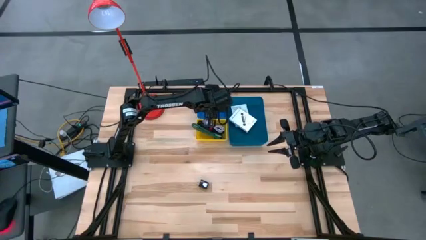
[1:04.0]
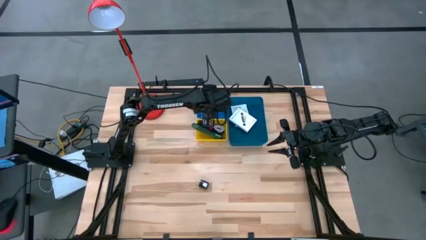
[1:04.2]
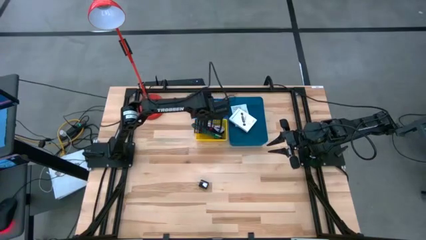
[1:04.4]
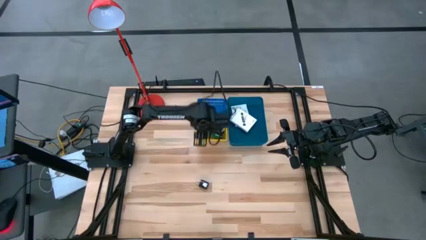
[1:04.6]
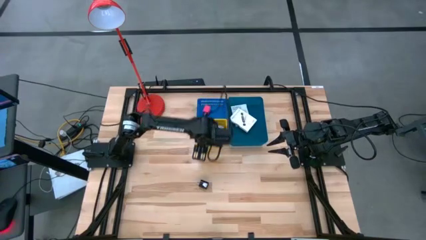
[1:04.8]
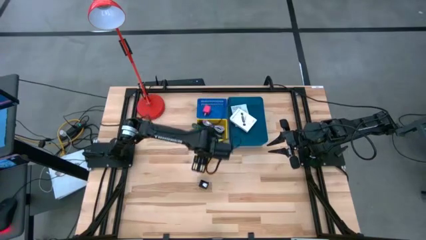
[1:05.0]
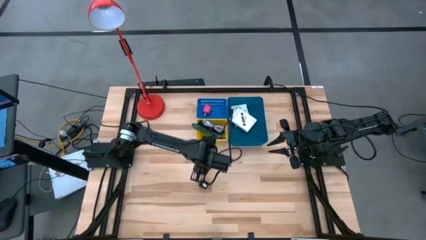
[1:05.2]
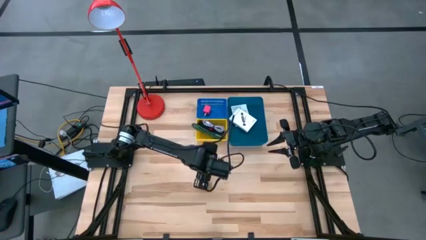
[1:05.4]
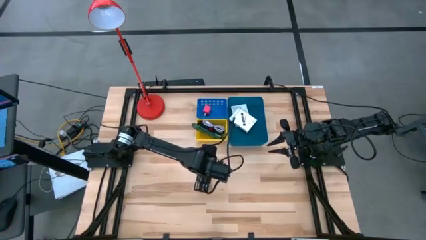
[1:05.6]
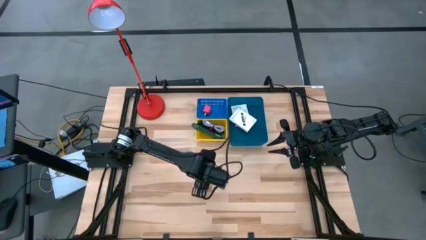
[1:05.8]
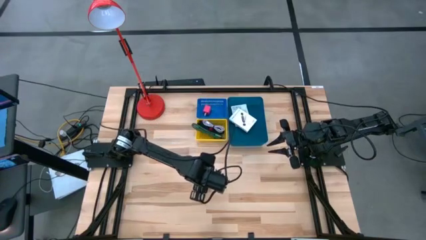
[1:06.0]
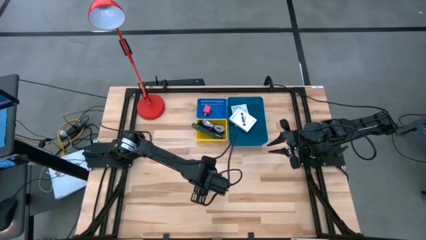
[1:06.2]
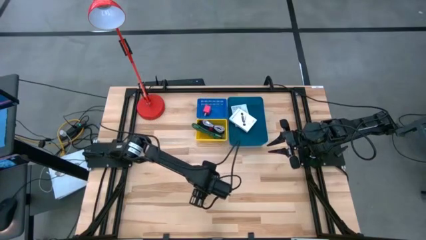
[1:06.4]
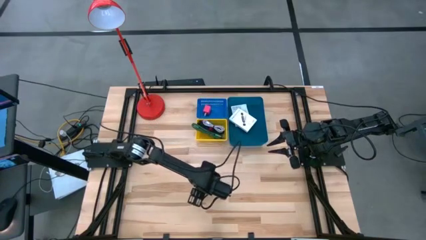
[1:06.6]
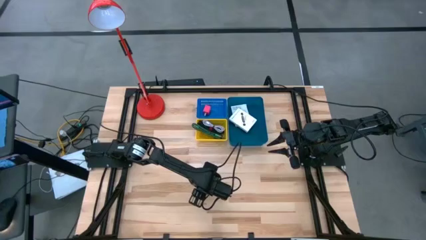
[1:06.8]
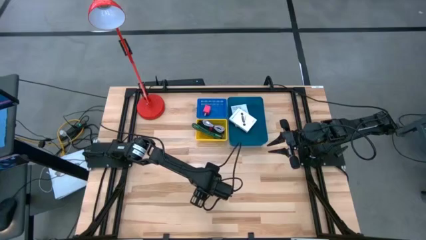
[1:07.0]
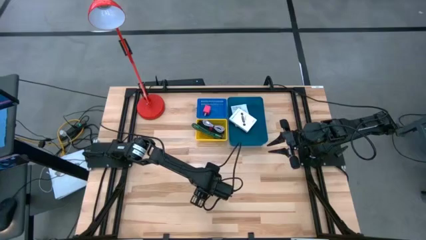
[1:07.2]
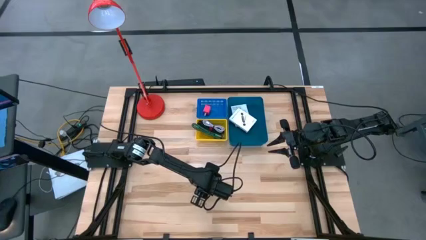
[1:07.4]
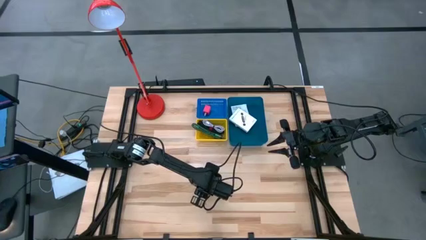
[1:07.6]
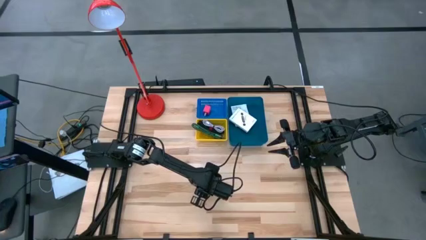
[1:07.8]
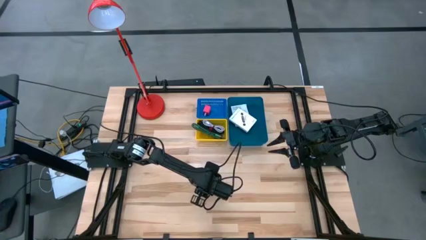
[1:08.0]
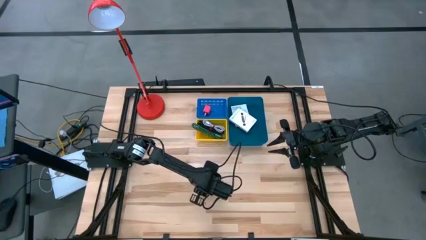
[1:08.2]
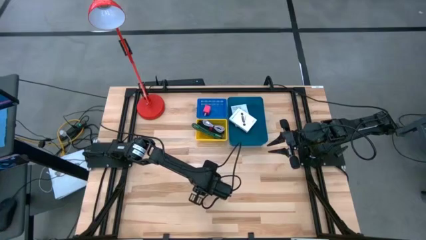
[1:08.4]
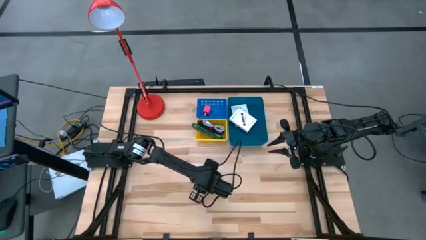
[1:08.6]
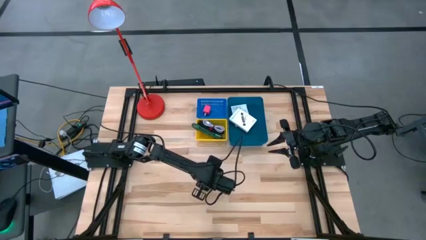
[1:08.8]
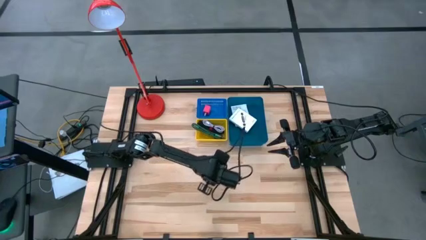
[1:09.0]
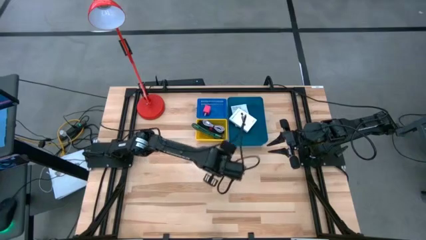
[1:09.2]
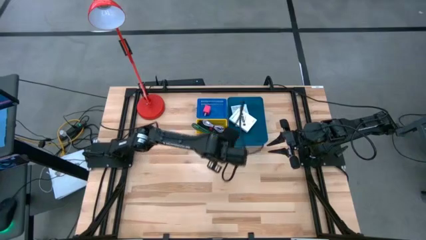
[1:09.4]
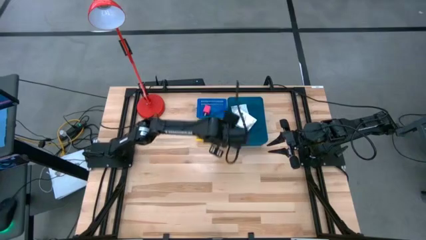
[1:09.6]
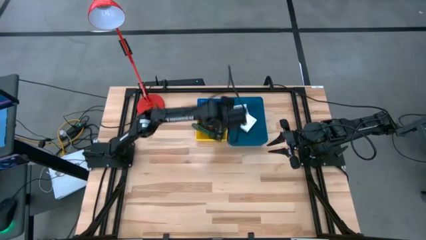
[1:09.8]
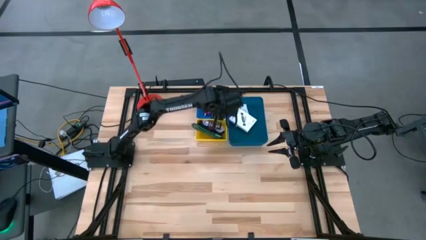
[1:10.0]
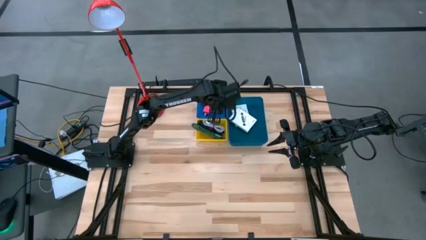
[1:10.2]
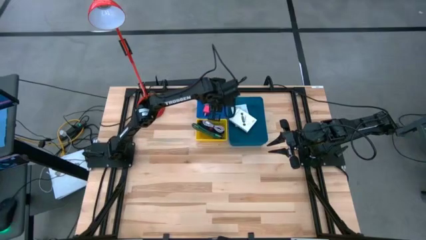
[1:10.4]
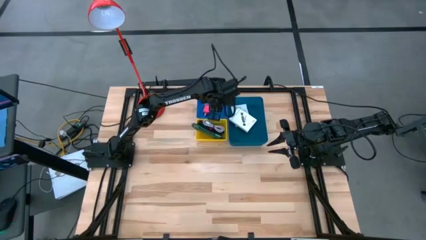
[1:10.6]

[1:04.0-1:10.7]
Task: Pick and place items into bin
Put the black charger adapter into the light blue bin

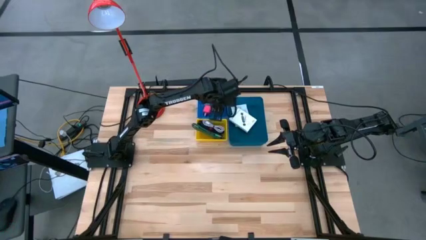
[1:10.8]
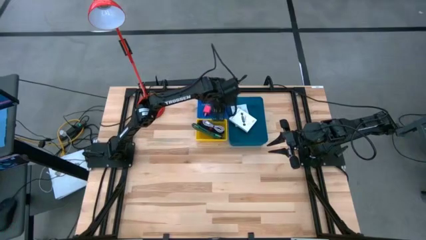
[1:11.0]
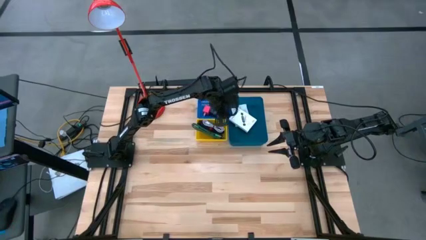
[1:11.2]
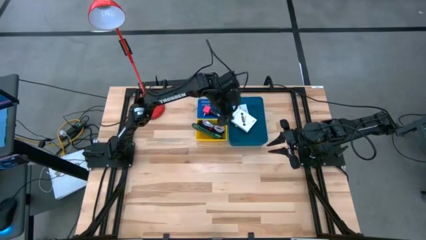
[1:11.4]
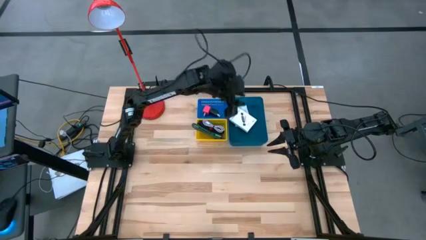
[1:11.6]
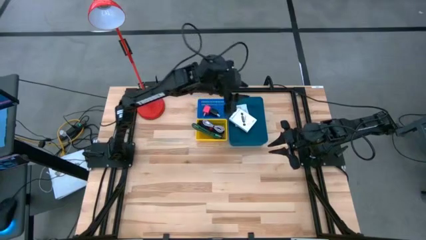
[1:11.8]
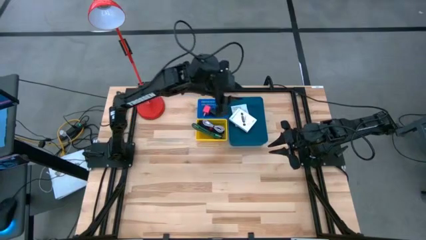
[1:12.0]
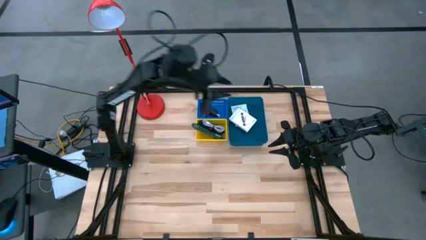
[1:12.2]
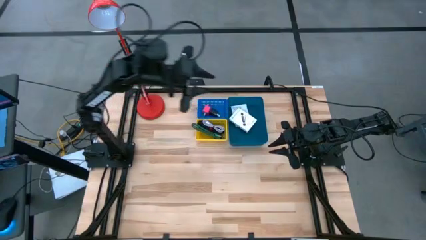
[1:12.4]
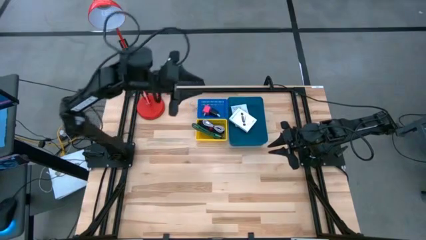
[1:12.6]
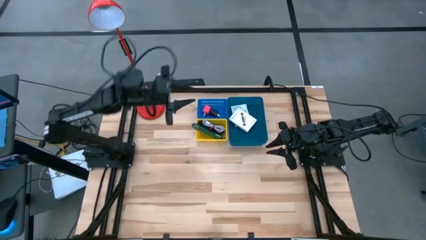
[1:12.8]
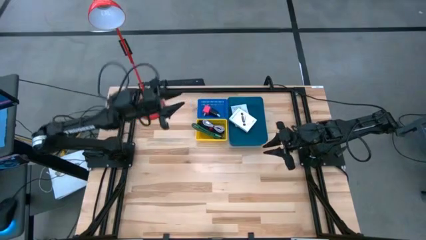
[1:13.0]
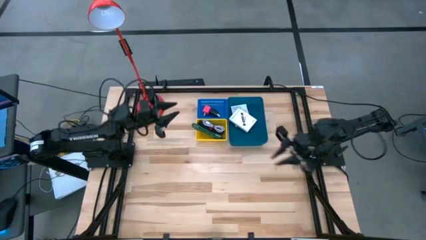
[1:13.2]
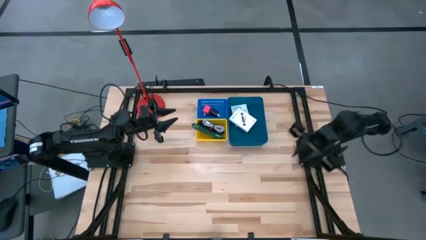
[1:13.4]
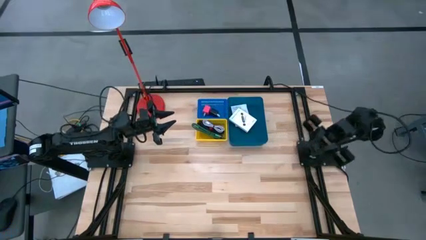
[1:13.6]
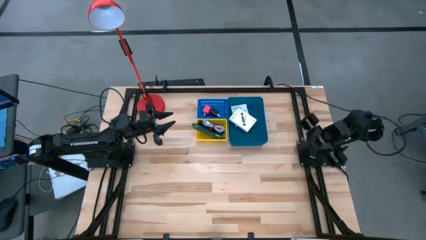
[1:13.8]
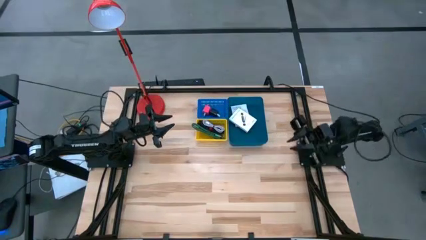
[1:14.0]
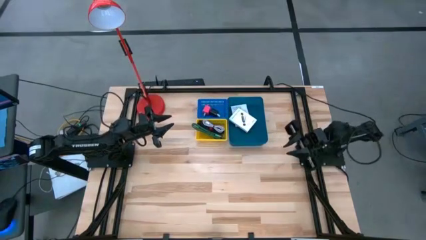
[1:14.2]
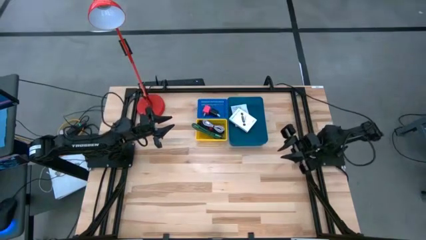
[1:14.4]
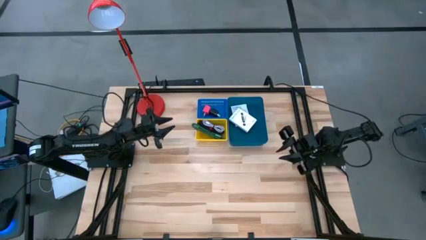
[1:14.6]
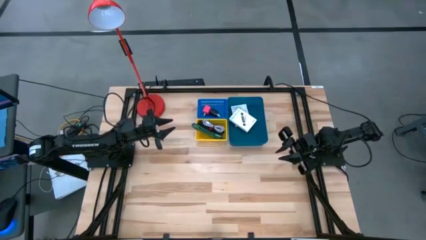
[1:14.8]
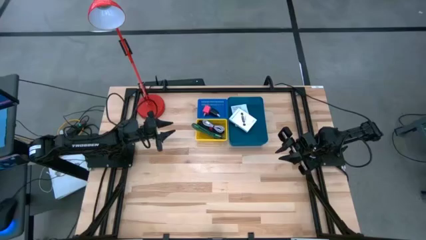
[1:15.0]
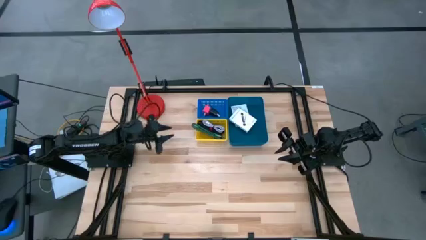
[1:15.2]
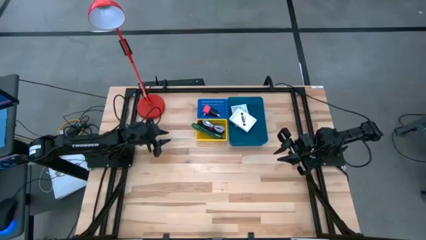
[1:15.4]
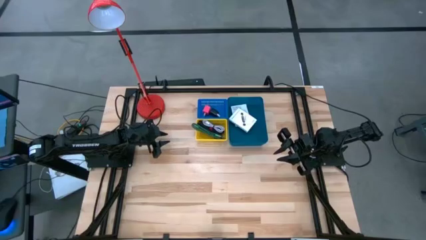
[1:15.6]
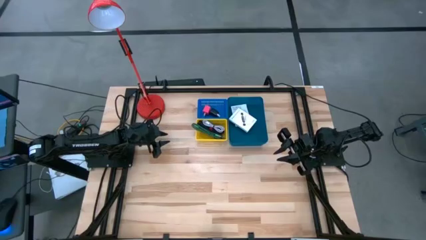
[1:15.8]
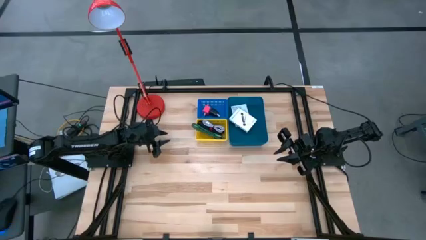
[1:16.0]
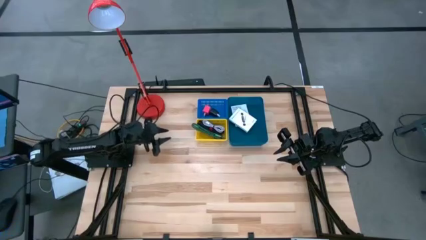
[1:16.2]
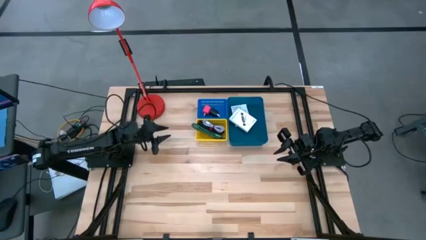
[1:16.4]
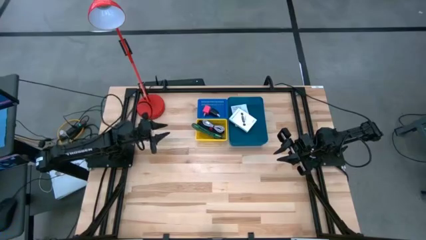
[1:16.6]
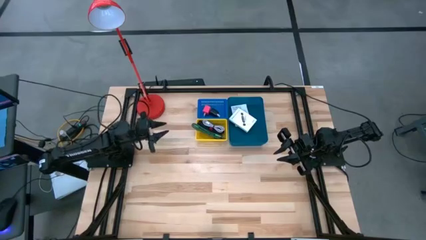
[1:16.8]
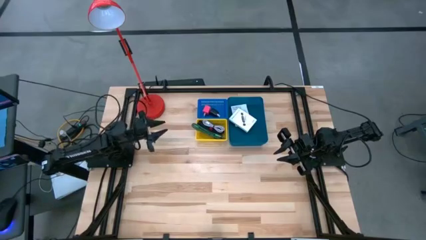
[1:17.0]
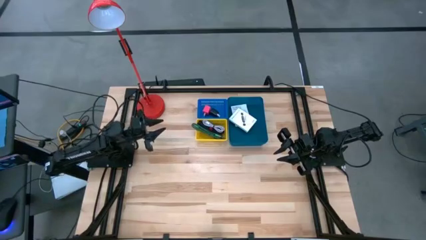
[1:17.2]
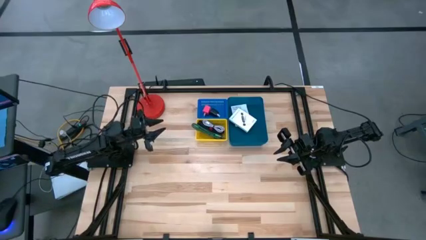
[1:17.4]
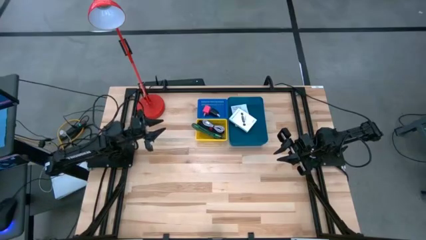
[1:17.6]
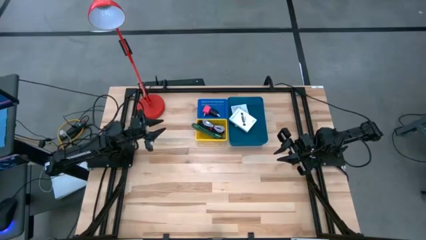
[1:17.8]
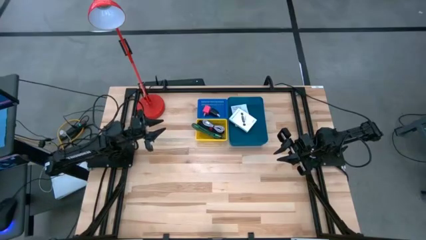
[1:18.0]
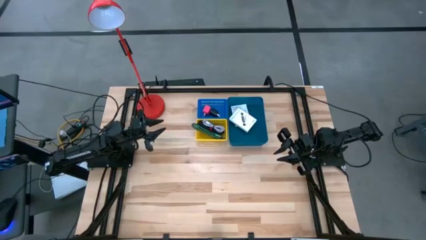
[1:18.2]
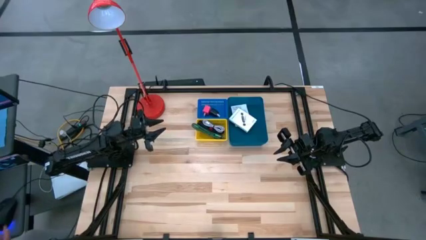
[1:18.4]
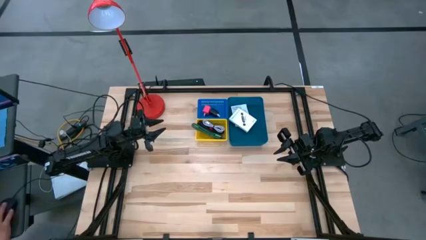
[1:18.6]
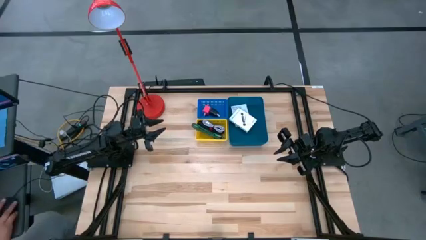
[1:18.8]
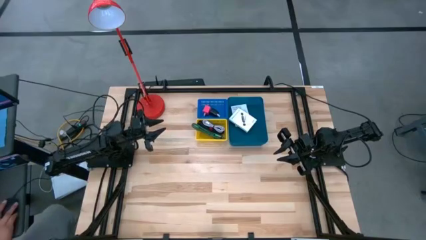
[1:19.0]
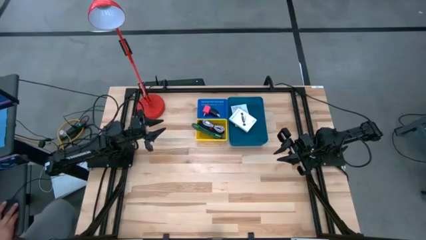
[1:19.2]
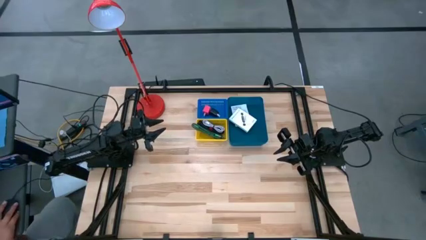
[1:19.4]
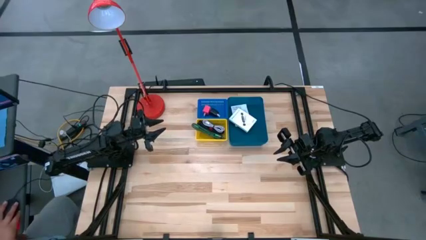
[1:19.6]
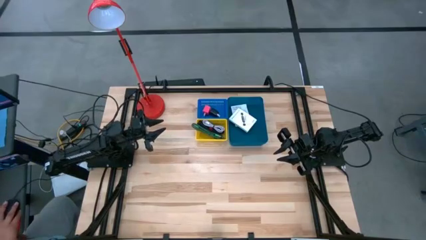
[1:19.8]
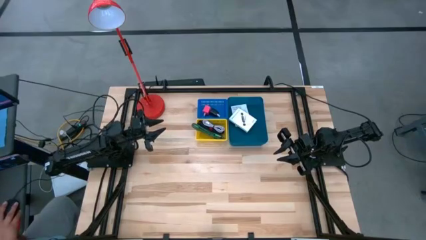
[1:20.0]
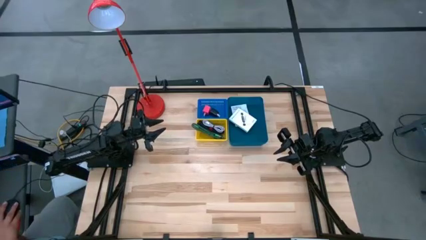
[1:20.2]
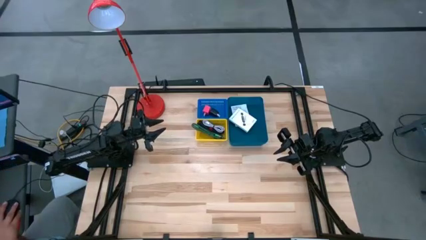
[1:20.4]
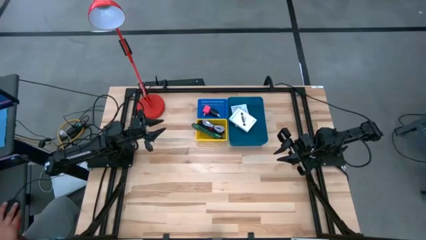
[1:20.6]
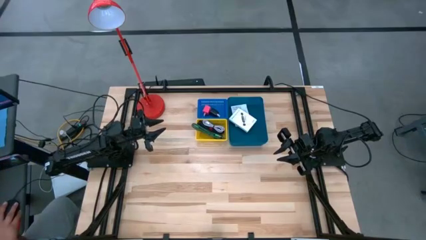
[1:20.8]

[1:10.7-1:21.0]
Return to Home Position
